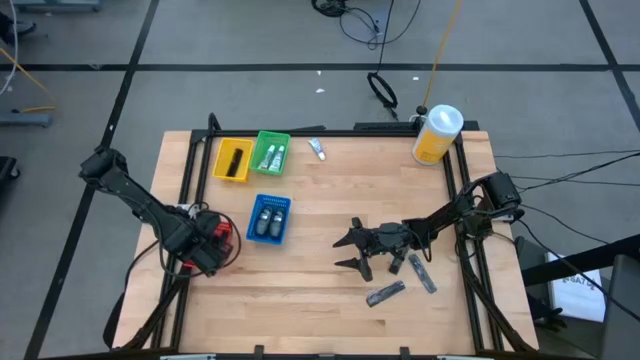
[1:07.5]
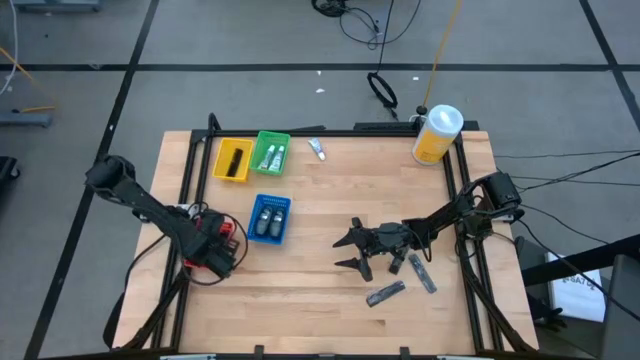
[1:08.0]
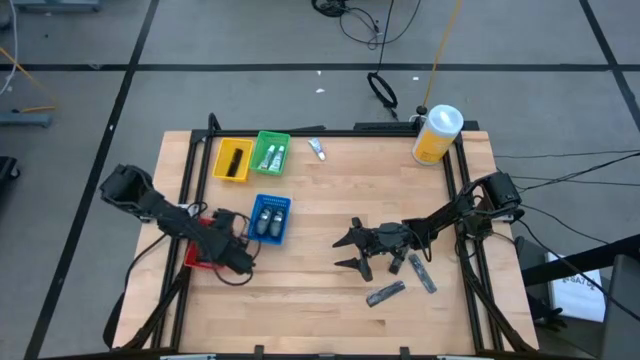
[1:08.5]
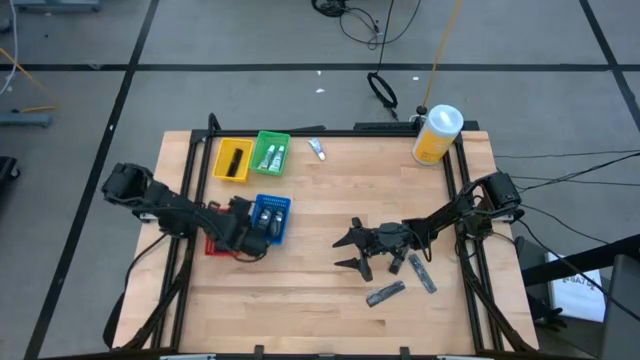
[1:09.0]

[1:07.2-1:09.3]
Task: Pick & Place Travel size toiletries
Adjust the red bin on the table

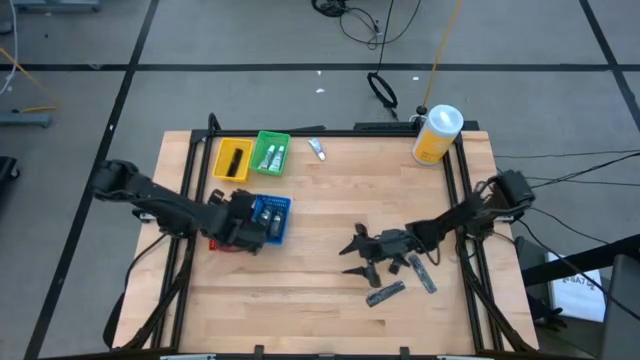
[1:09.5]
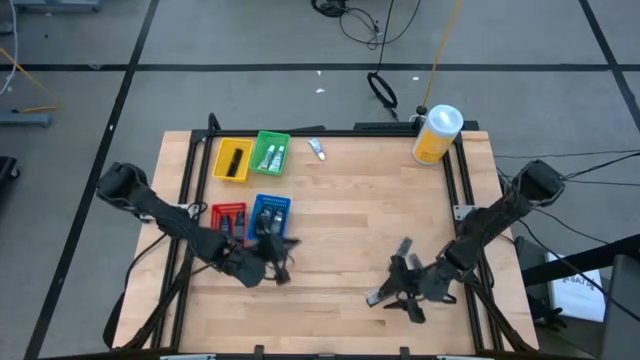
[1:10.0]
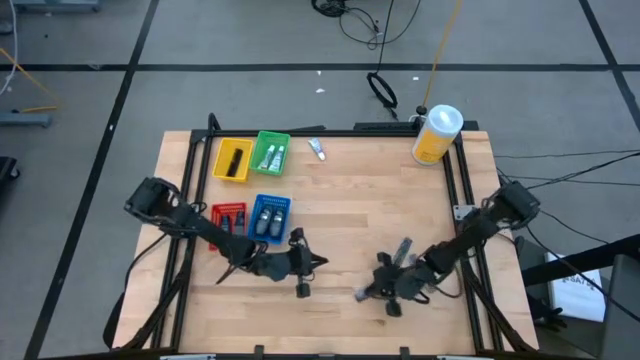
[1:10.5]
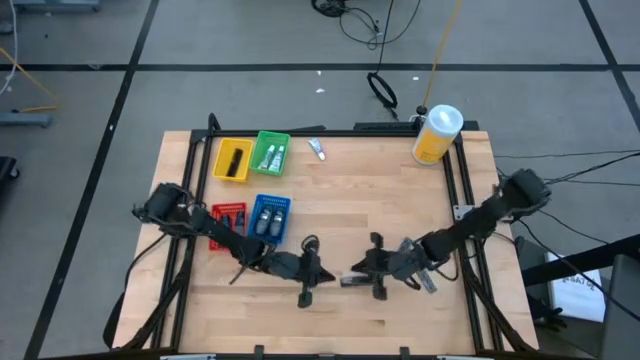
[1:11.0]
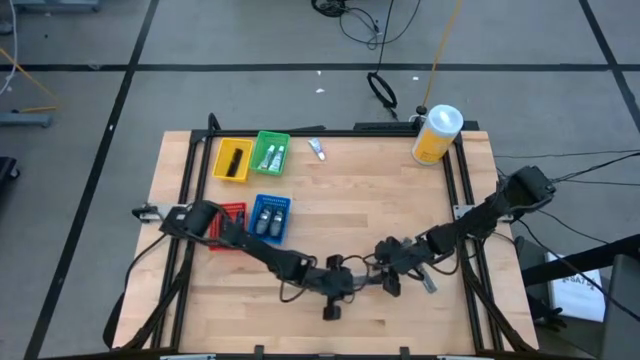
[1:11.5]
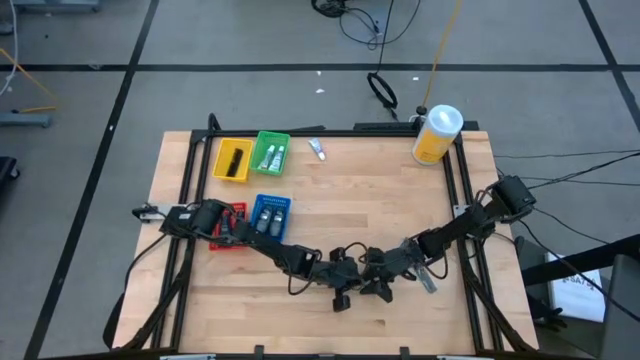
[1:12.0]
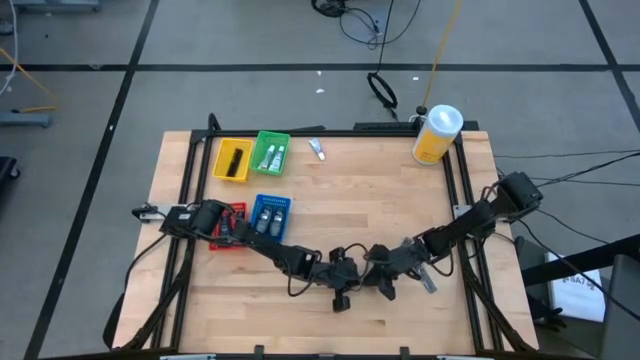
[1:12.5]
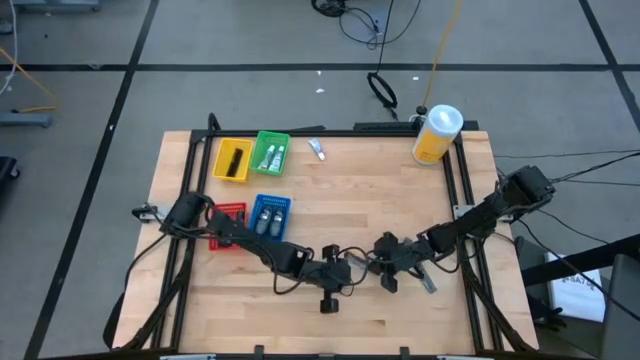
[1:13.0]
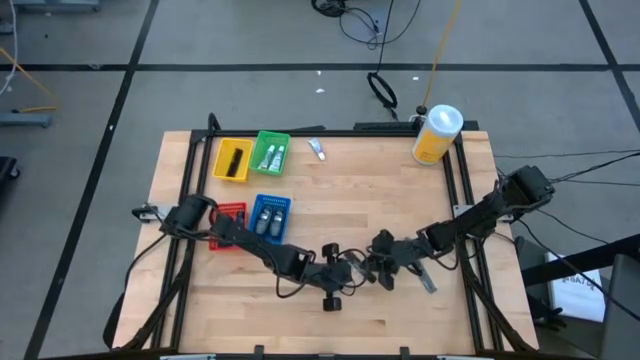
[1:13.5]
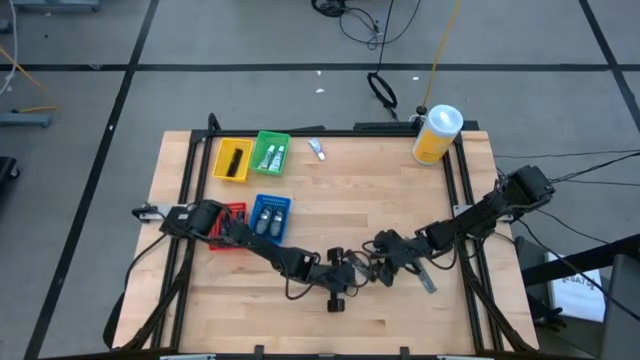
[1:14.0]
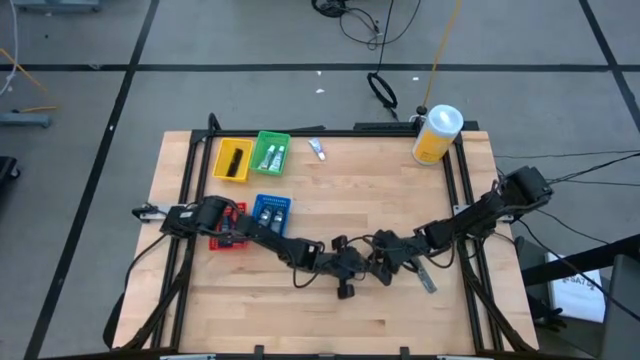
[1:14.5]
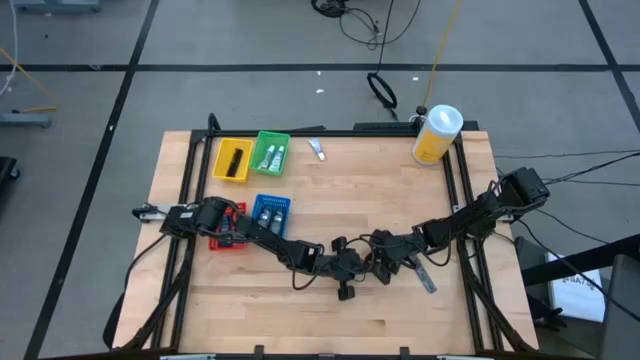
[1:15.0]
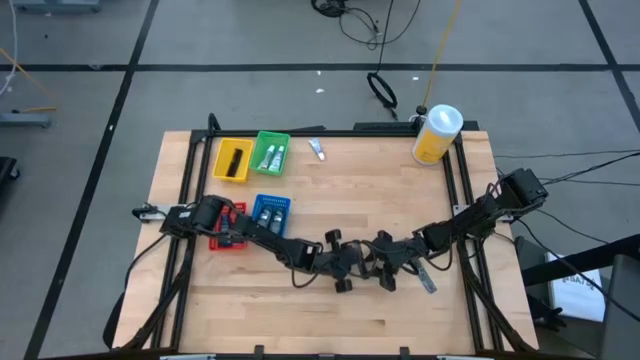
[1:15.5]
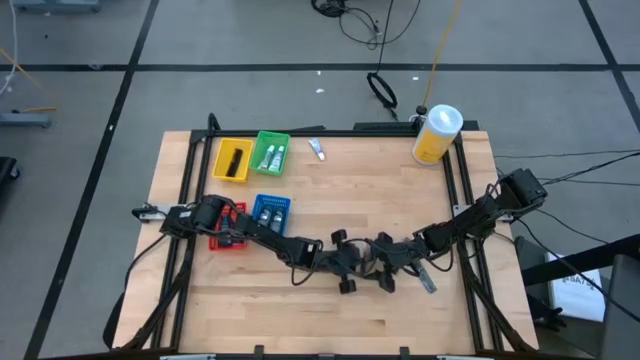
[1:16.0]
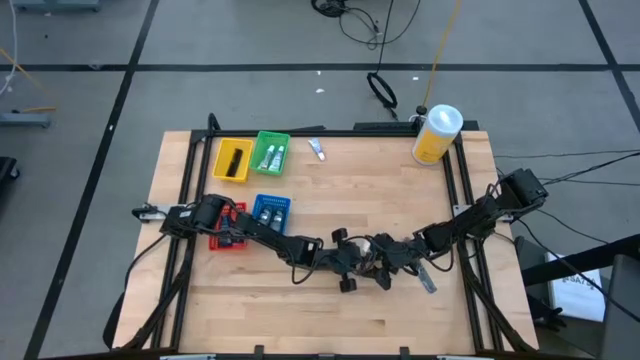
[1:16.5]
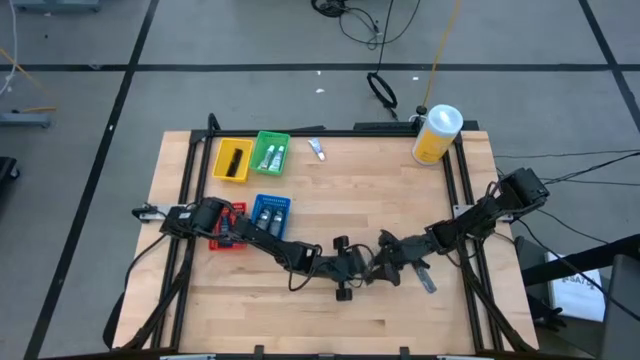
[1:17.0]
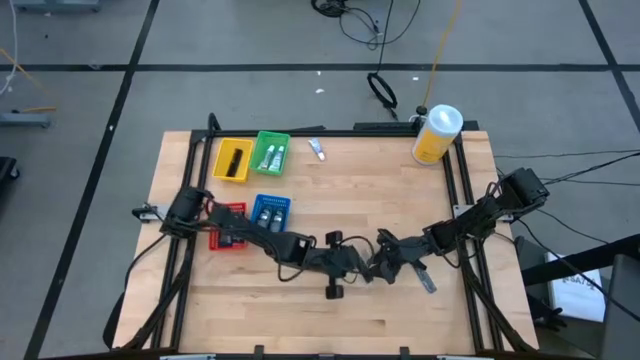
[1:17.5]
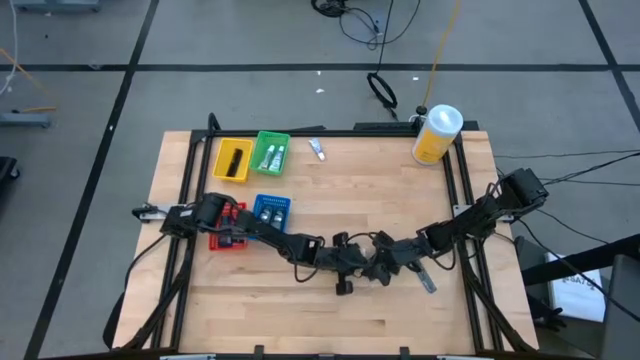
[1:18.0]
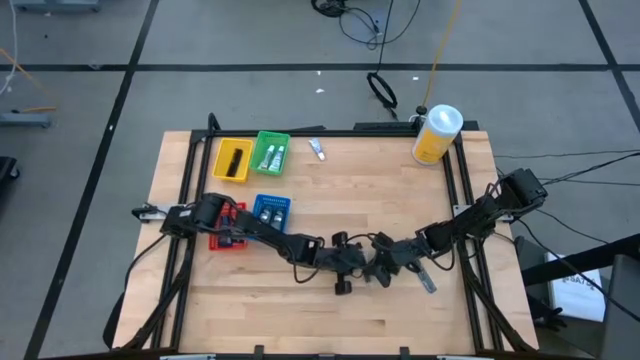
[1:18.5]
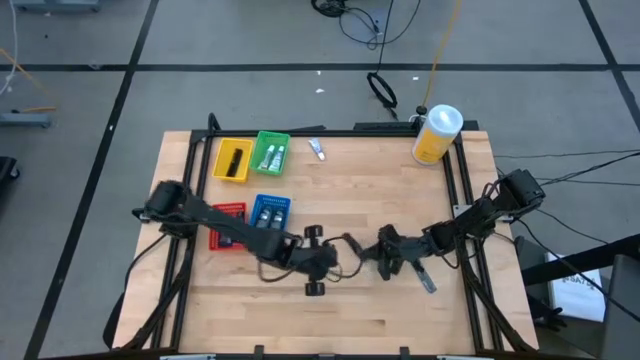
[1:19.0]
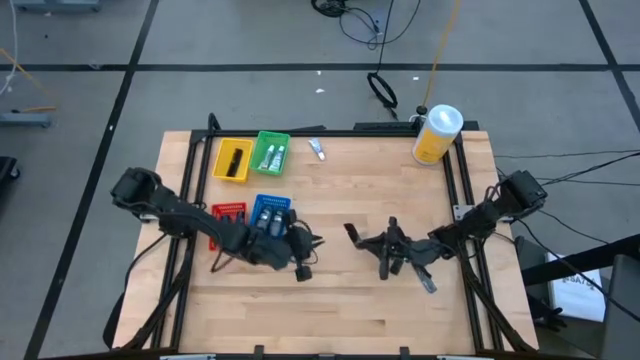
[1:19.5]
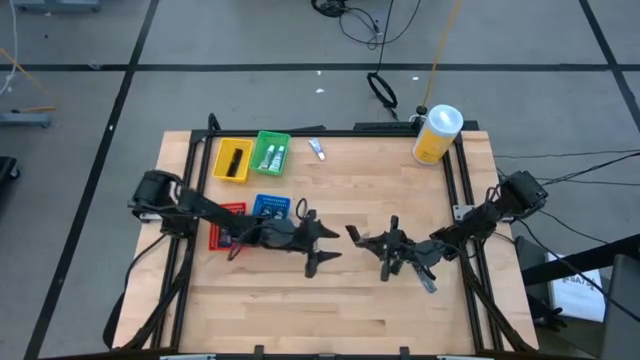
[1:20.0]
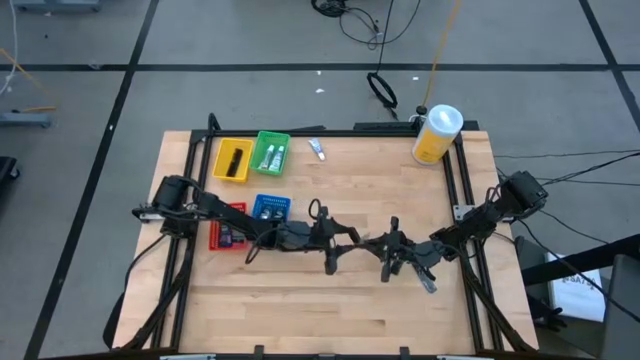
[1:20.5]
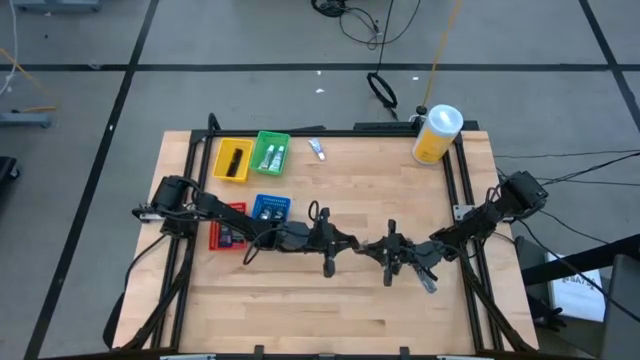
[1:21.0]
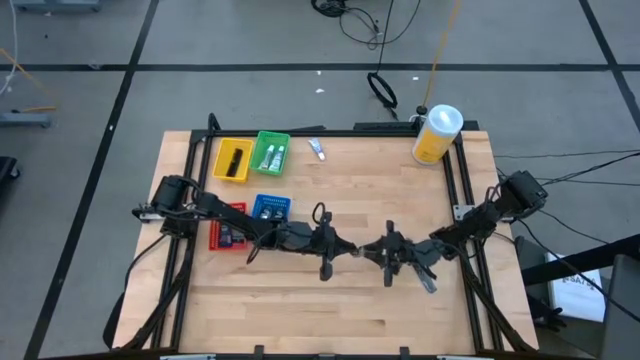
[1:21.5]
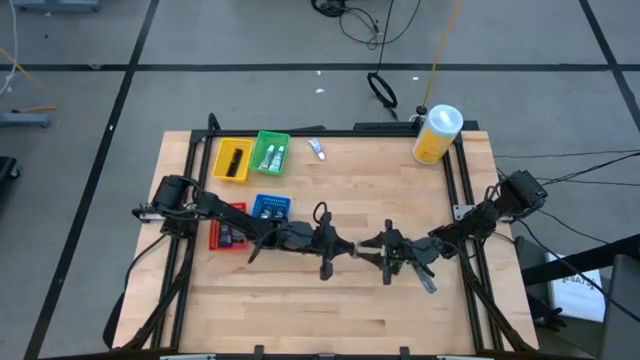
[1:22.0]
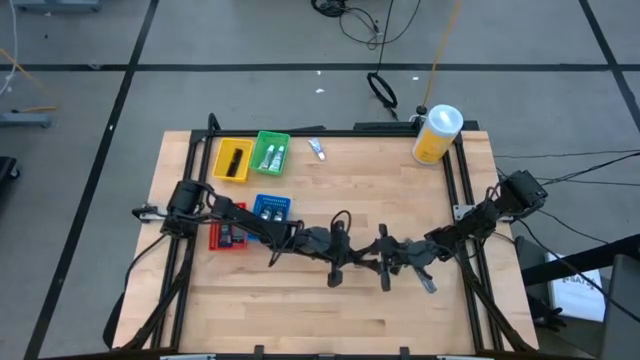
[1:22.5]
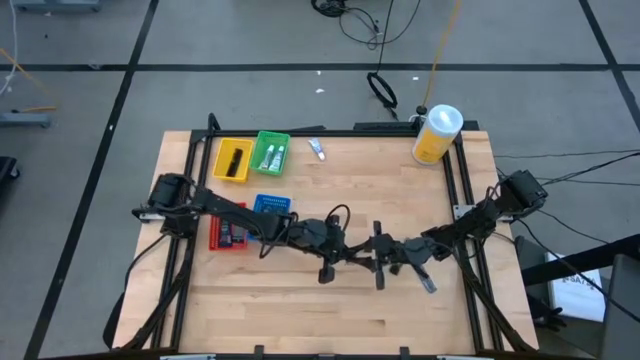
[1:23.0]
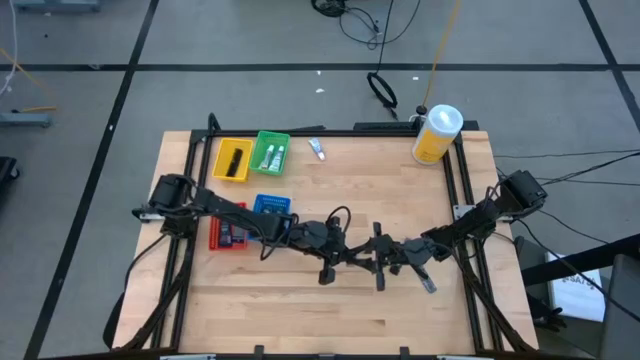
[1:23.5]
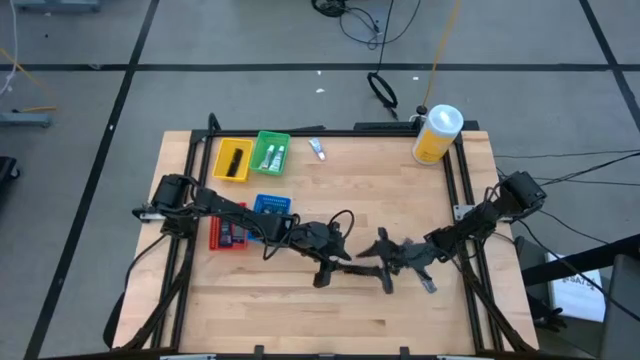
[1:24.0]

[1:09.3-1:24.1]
Put the black comb into the yellow bin

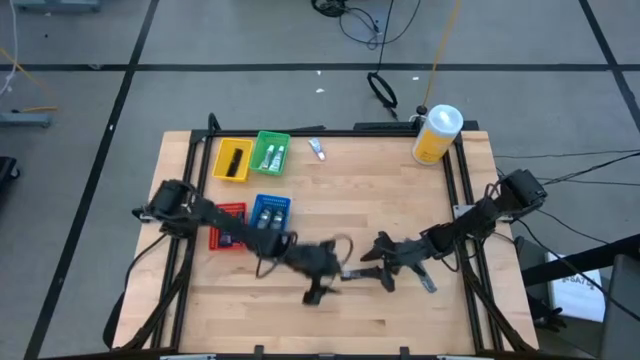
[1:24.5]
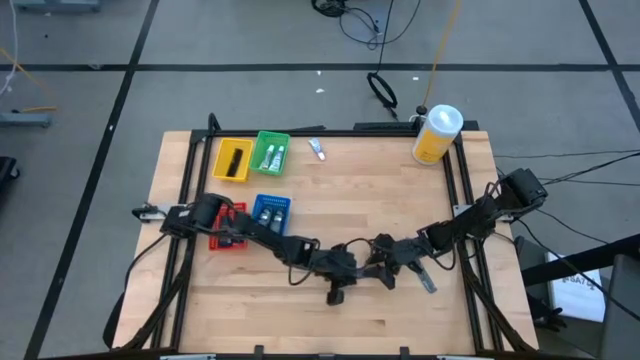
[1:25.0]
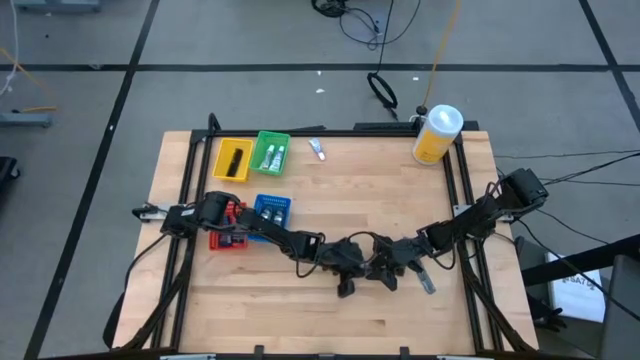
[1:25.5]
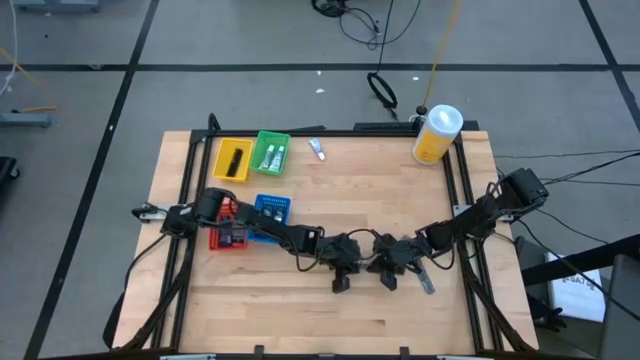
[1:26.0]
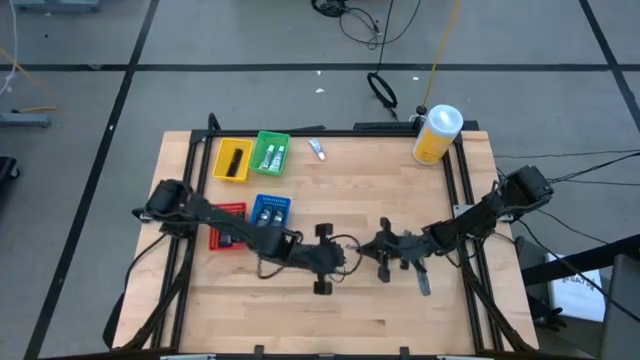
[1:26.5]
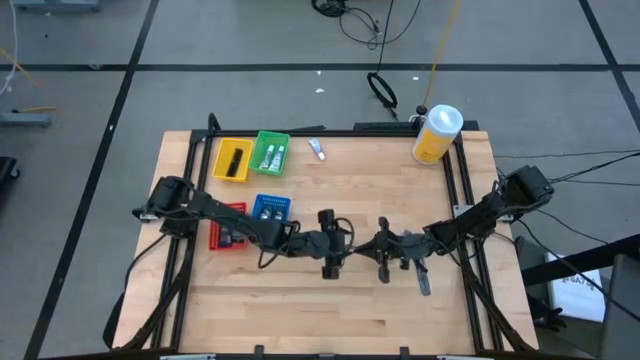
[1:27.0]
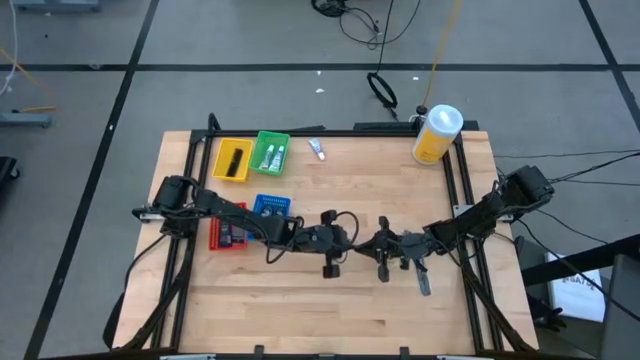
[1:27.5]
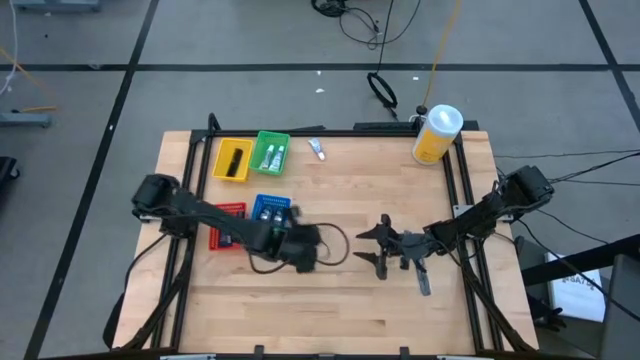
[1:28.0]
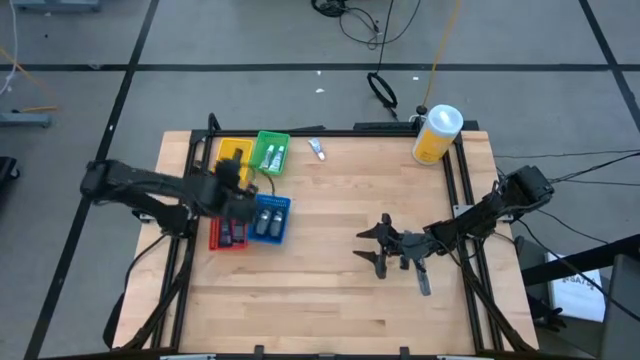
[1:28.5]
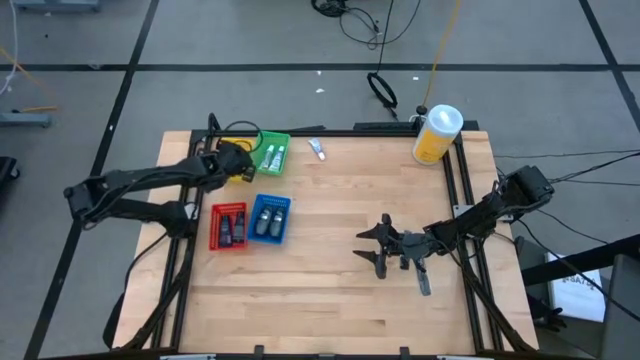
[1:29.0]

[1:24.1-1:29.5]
Put the black comb into the yellow bin
